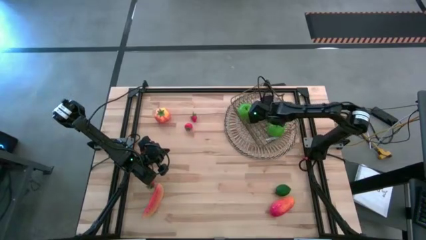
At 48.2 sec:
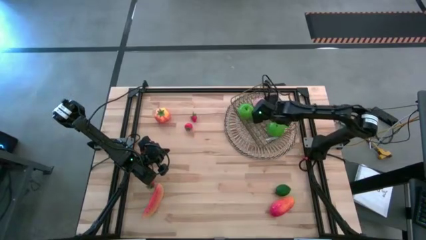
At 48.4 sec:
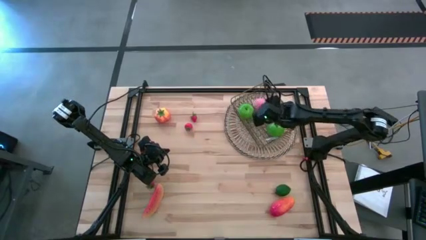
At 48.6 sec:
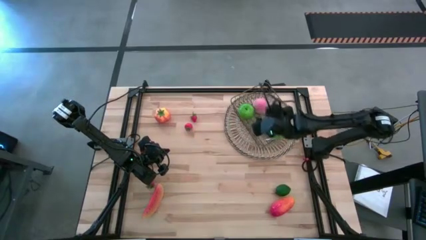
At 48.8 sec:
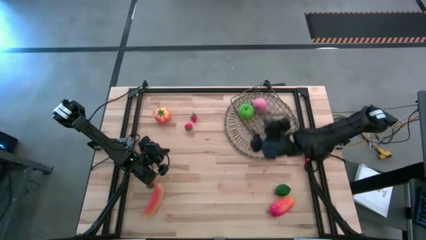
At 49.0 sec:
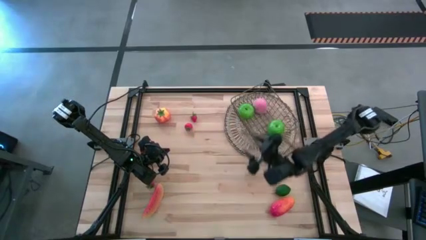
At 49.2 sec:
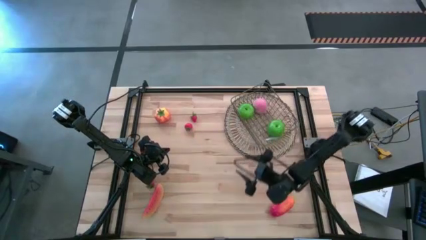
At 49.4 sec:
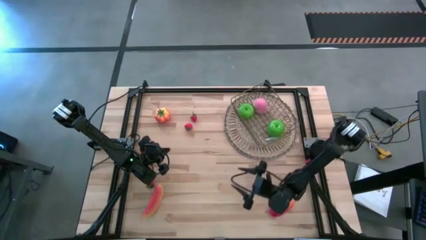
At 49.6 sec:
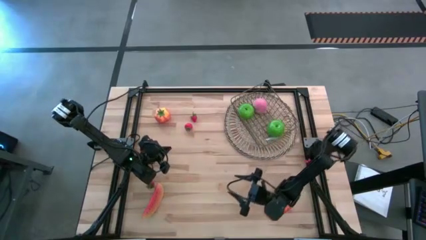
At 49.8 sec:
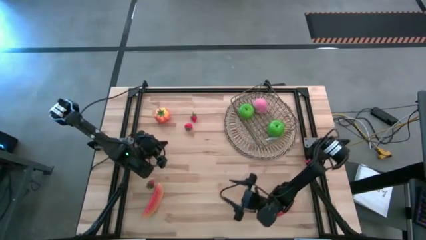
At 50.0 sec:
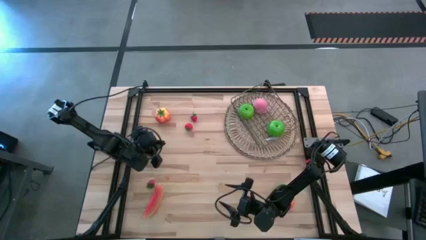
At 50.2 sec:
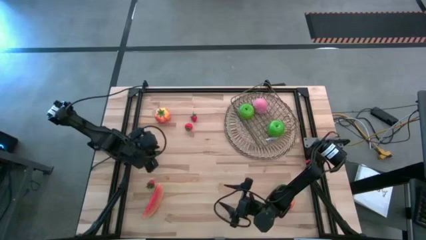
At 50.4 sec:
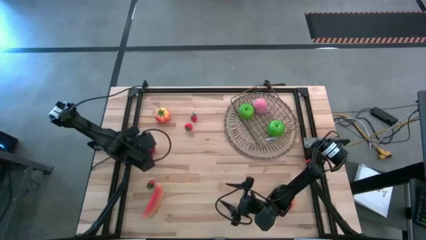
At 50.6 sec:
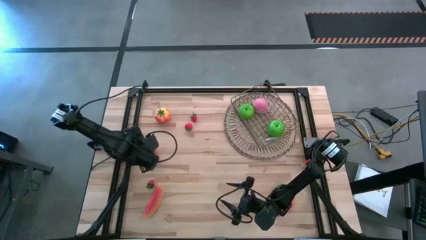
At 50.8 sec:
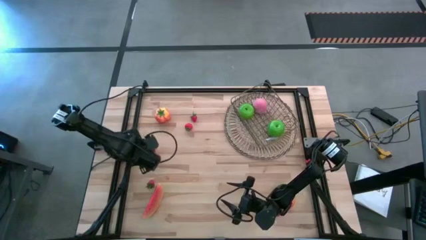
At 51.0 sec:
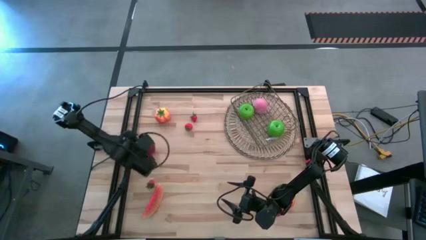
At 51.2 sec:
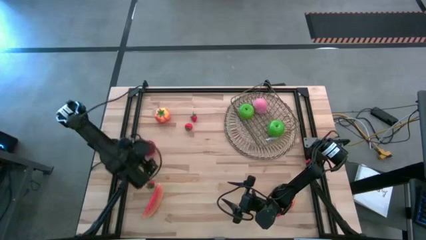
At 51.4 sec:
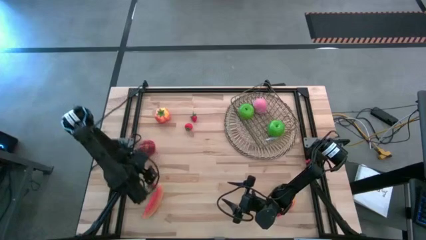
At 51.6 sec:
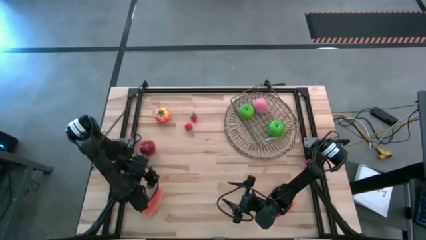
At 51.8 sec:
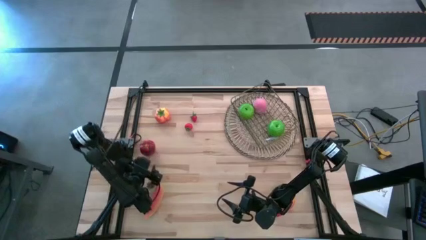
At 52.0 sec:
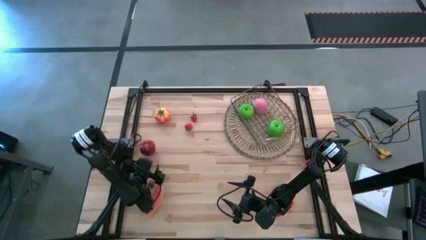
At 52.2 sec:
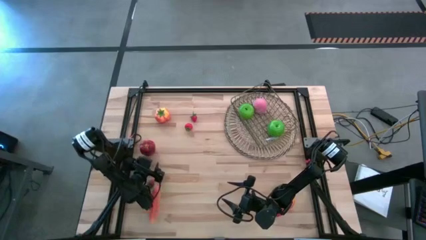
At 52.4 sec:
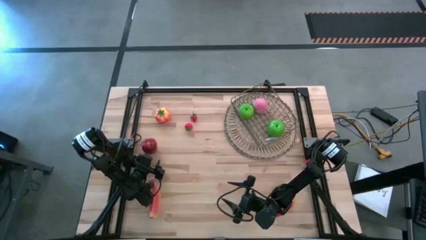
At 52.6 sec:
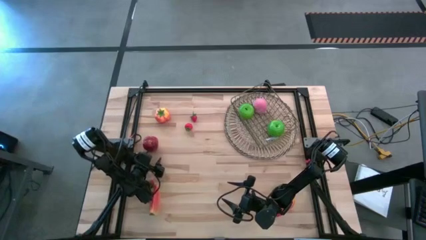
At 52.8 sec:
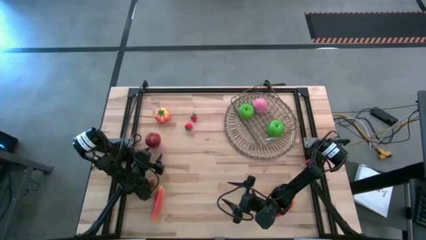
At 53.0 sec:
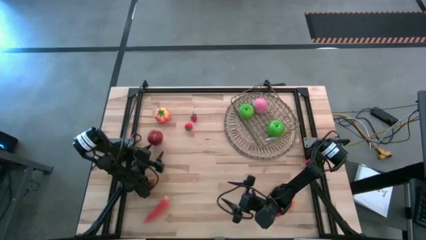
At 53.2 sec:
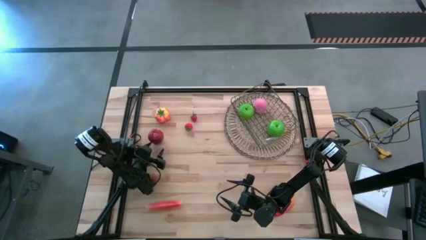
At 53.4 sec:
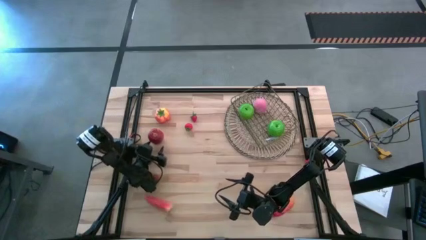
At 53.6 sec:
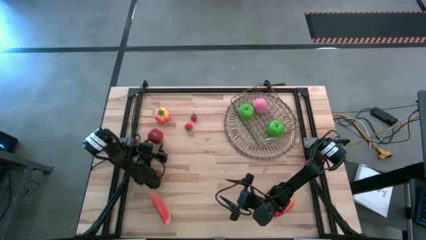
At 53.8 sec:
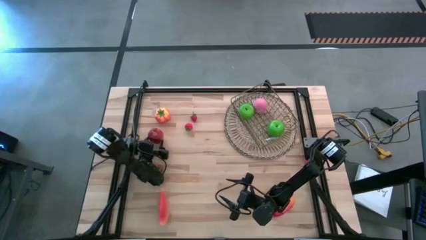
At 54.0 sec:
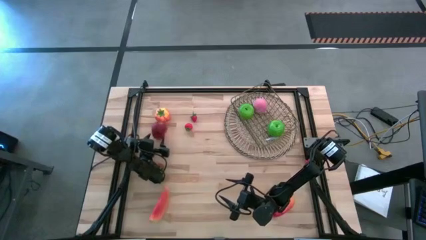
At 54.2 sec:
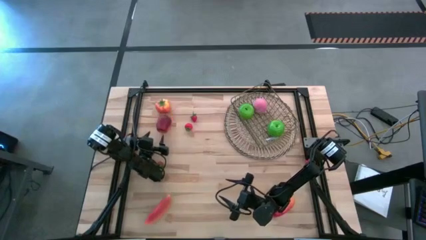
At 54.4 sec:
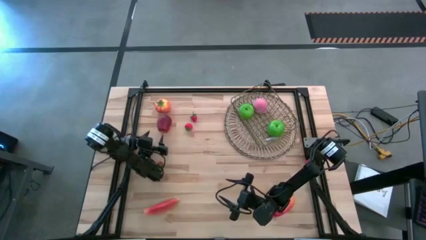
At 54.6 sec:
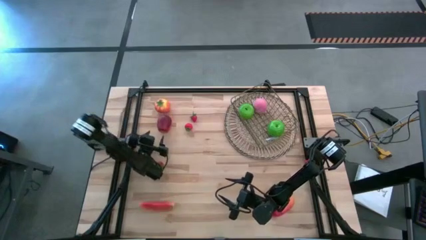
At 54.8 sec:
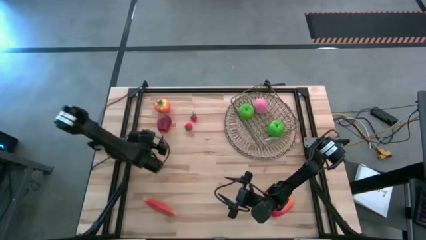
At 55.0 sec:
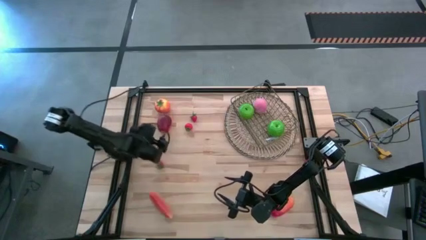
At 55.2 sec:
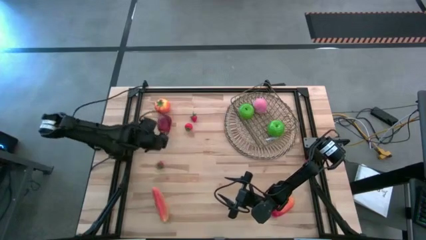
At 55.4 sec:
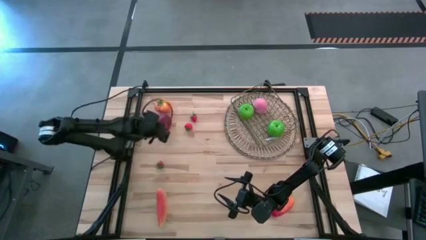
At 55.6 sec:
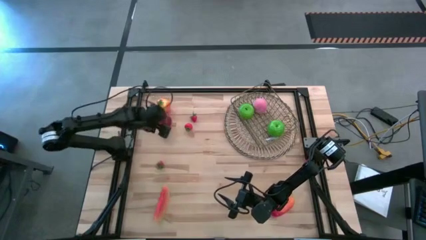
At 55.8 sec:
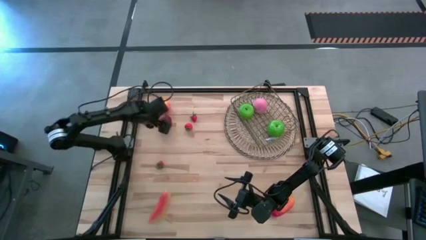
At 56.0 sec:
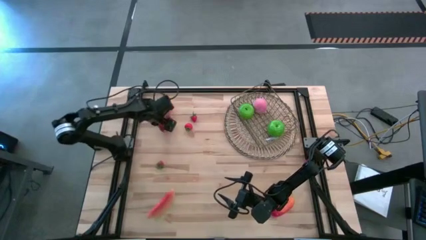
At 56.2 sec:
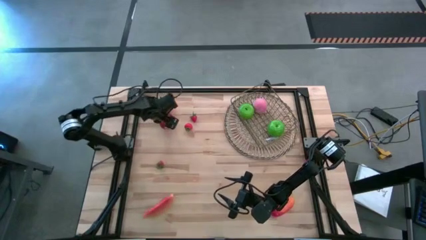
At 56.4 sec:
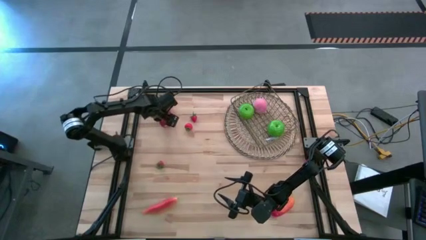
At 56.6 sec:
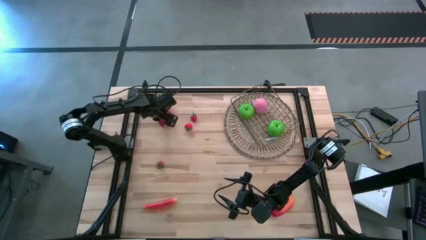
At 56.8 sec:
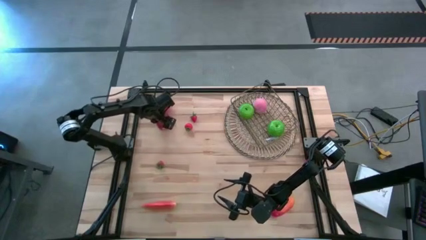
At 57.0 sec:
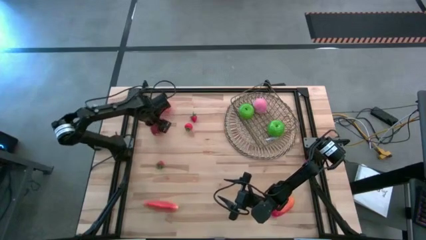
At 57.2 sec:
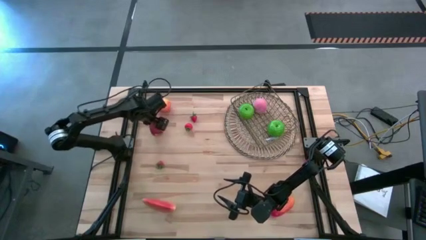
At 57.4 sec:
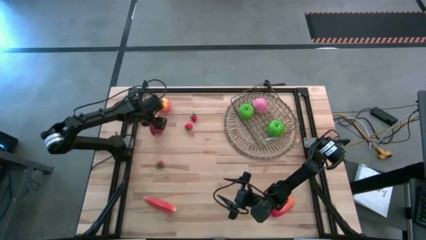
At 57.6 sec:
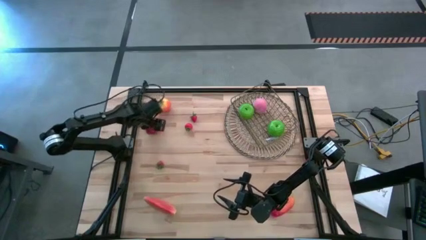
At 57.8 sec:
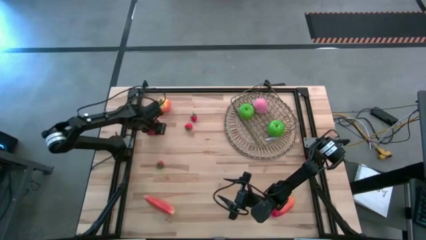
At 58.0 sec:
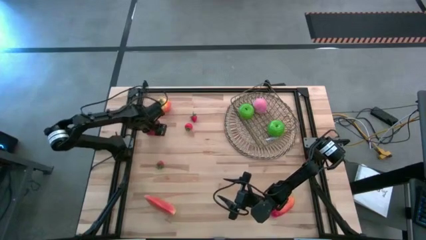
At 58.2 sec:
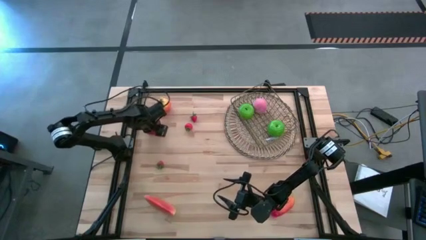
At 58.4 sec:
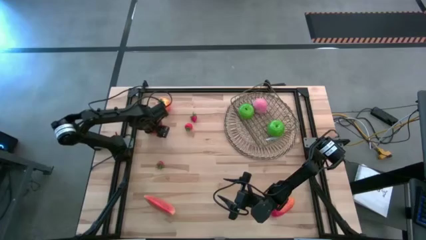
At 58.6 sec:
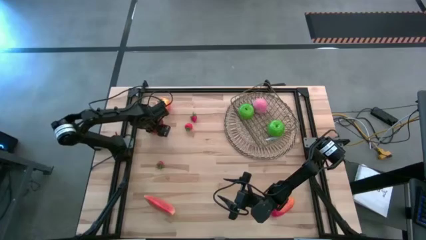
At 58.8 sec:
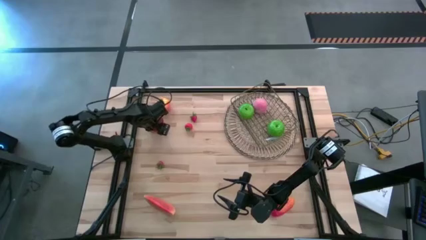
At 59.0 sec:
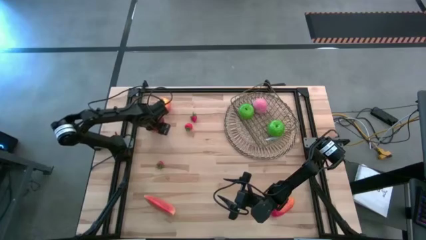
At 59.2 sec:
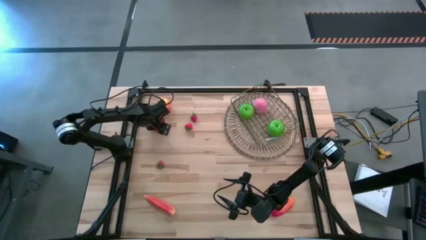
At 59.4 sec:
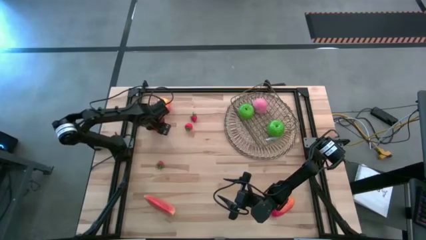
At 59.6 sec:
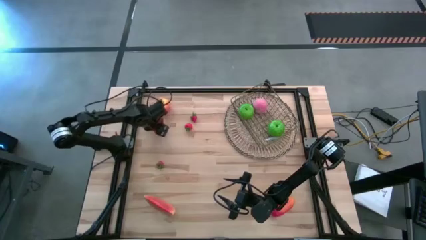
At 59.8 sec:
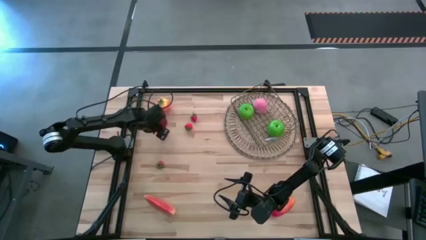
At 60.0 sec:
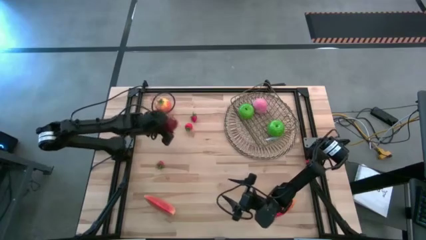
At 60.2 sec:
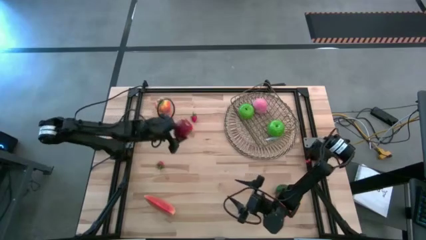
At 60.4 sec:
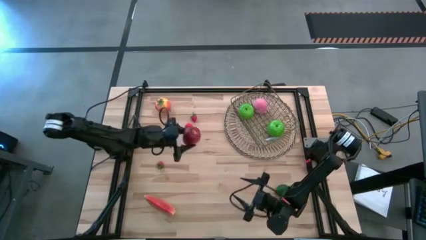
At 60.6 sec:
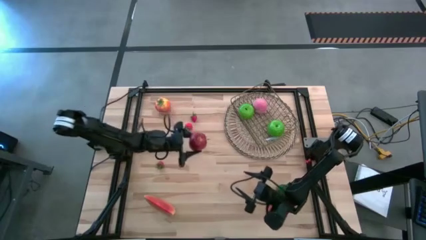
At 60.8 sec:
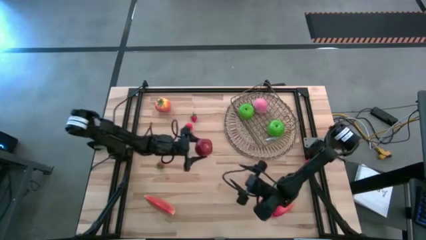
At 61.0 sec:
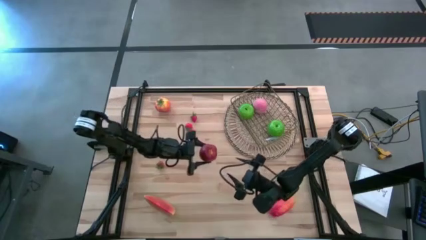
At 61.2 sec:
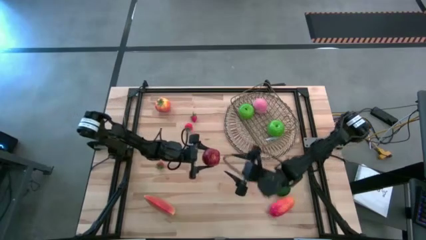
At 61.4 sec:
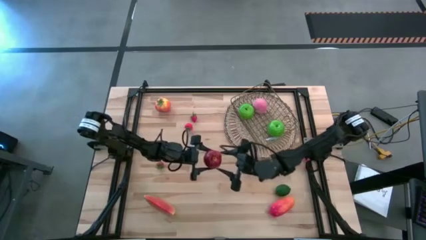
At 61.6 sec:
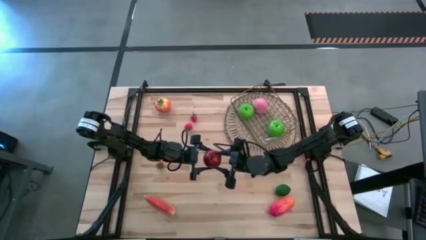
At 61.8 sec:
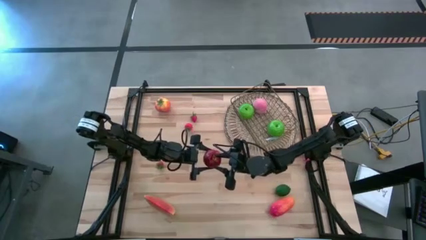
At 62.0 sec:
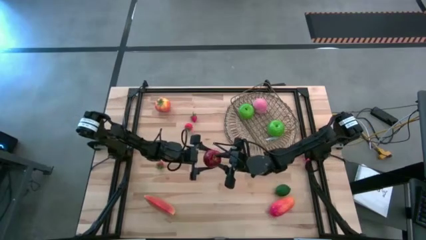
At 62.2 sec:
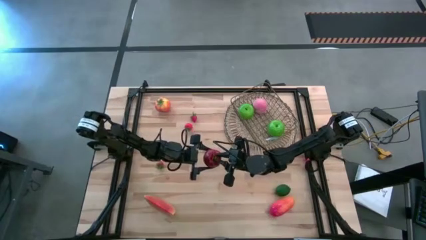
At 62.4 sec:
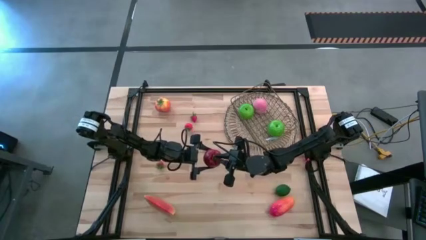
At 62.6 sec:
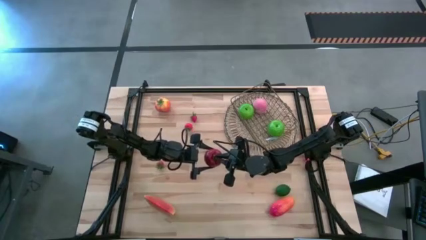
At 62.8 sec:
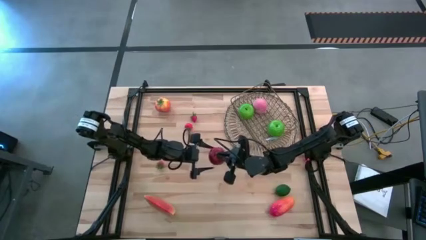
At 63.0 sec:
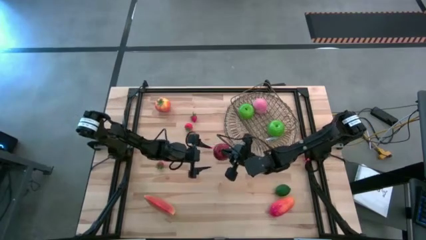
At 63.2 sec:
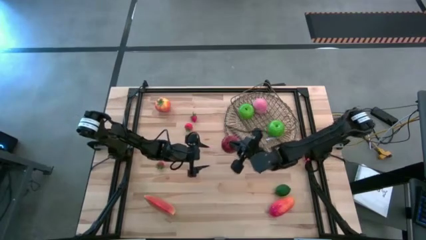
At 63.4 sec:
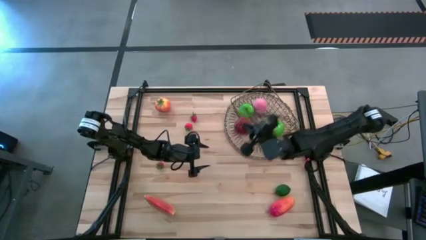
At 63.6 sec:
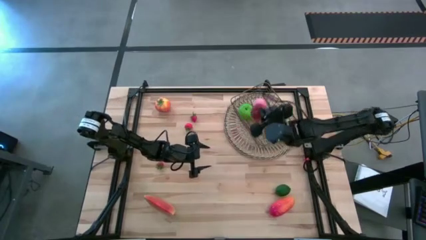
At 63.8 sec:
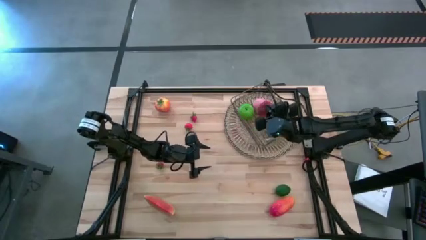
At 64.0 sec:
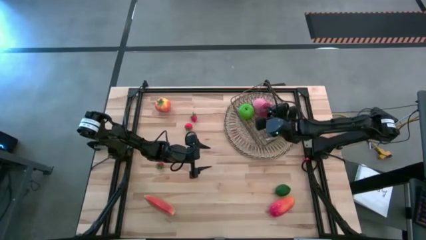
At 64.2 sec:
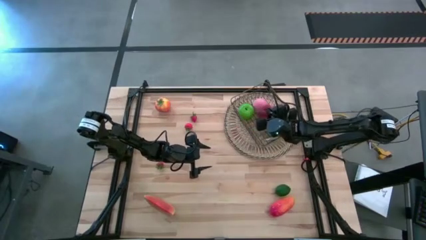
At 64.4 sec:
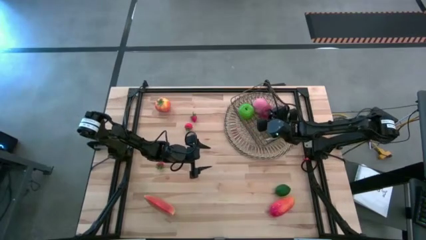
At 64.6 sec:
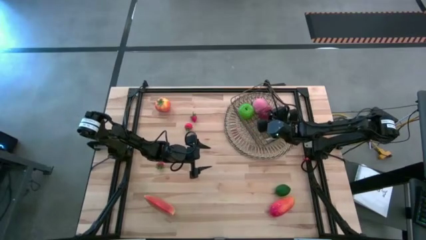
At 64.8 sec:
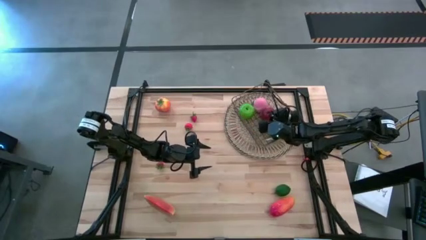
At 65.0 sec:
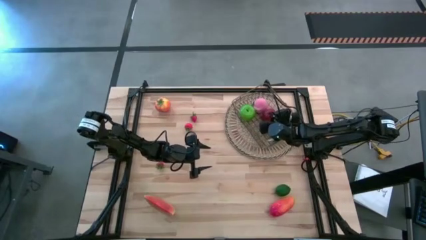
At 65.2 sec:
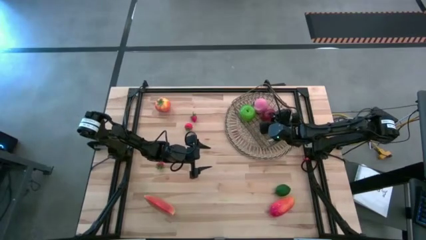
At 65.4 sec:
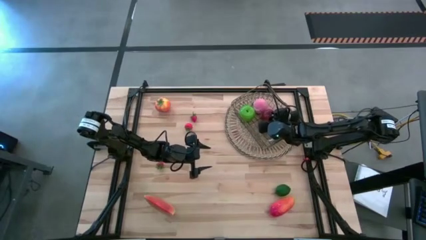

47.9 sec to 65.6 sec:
Task: Build produce basket
Put the red apple into the gold wire basket
